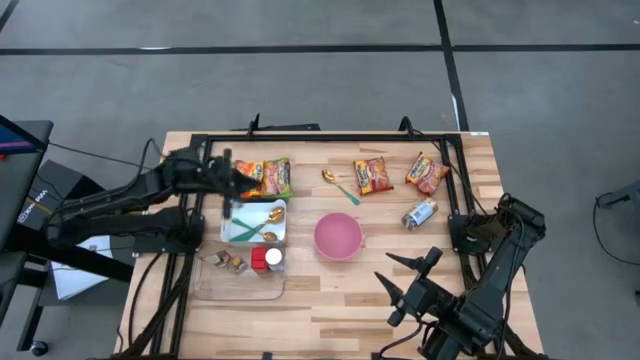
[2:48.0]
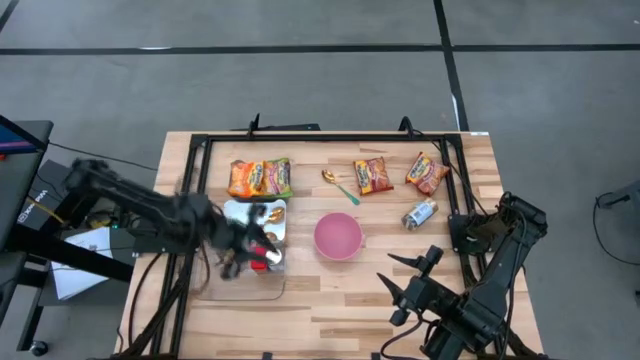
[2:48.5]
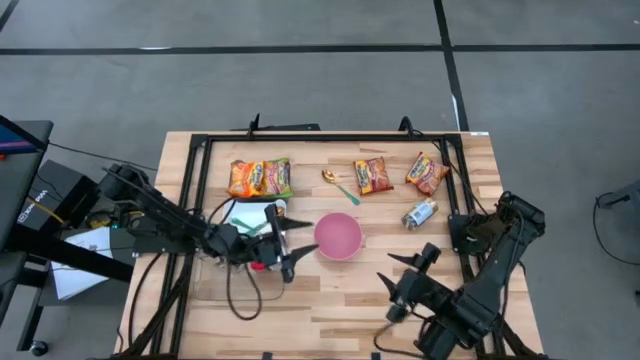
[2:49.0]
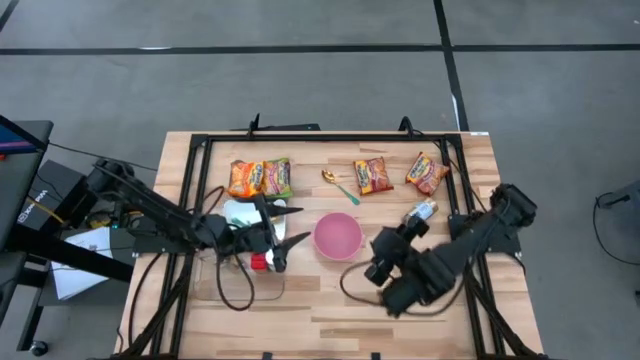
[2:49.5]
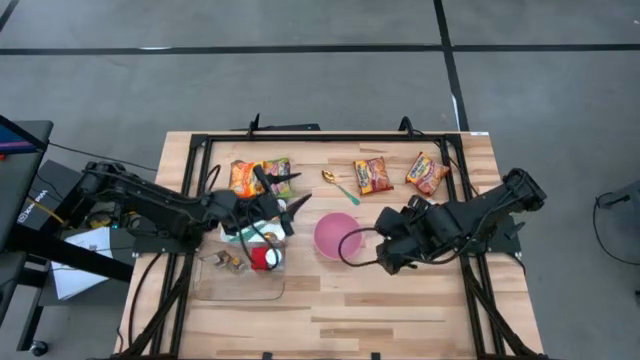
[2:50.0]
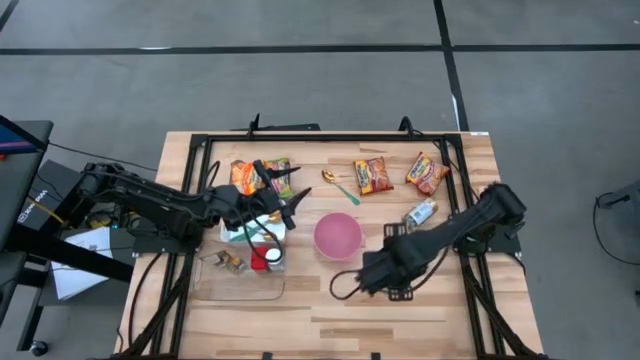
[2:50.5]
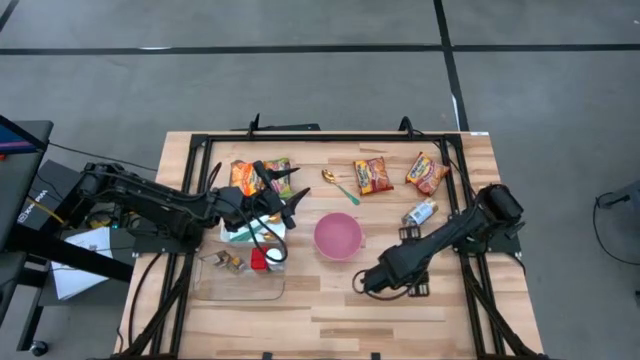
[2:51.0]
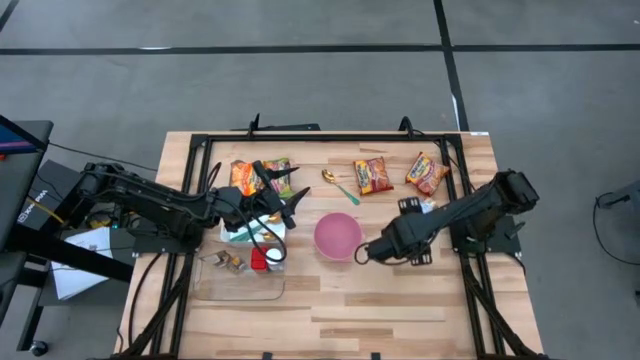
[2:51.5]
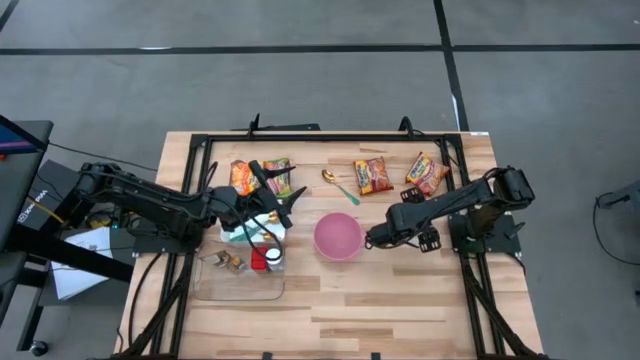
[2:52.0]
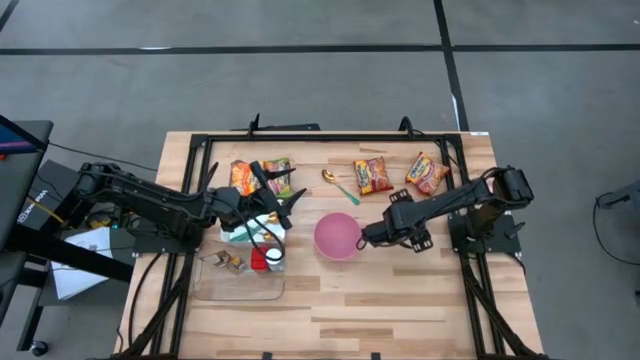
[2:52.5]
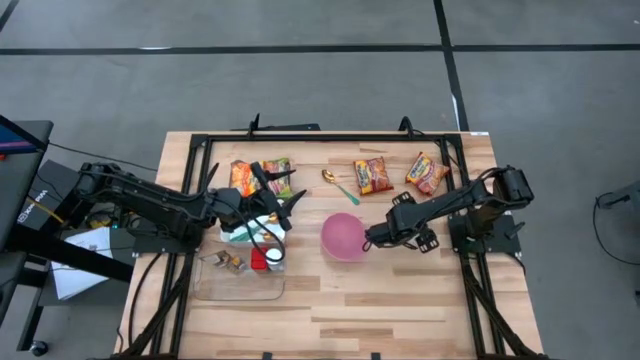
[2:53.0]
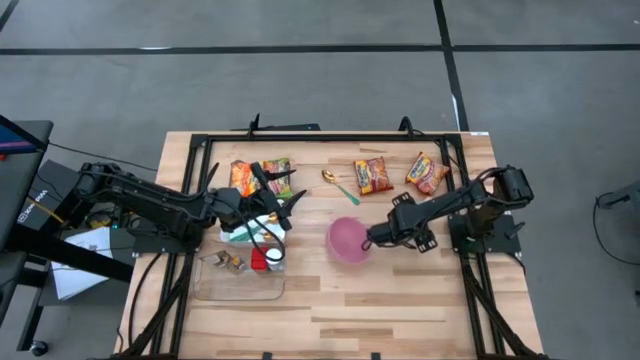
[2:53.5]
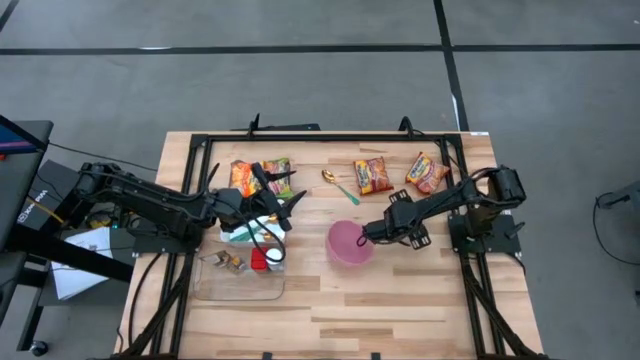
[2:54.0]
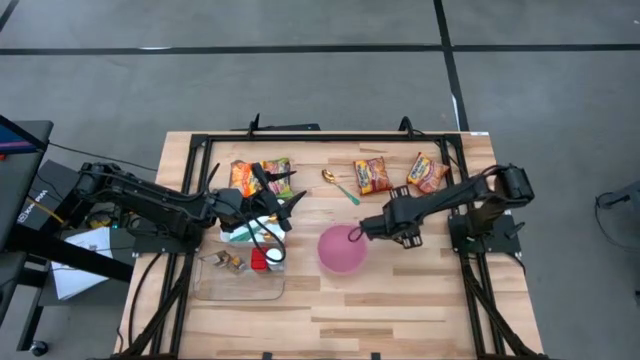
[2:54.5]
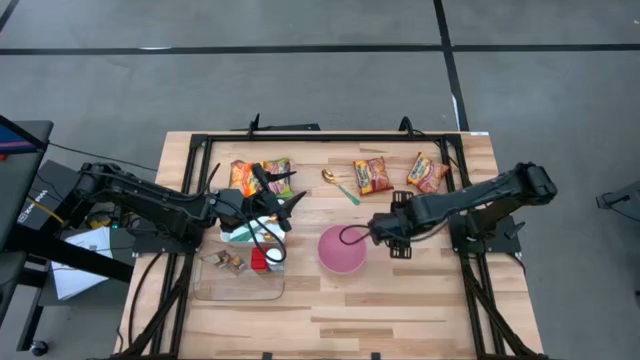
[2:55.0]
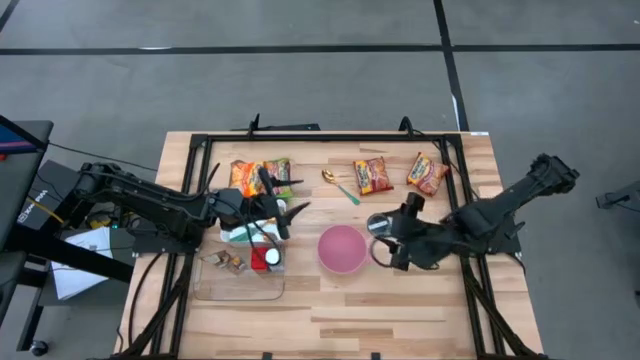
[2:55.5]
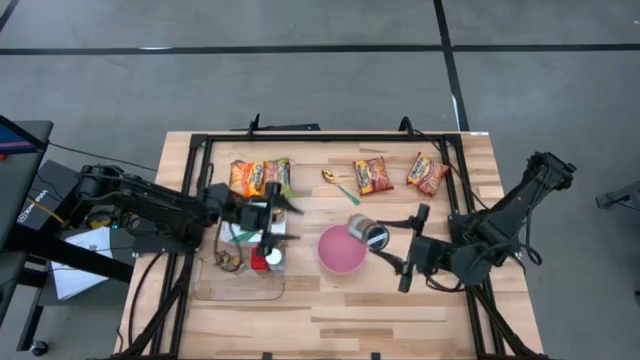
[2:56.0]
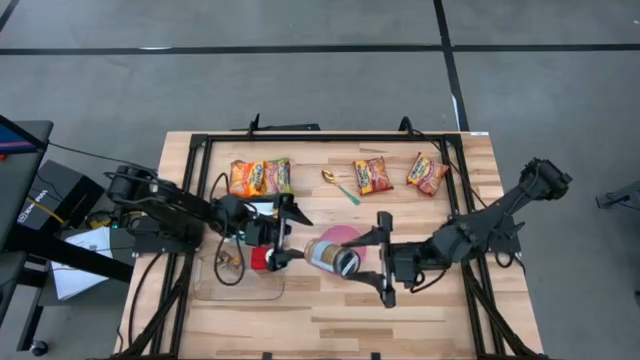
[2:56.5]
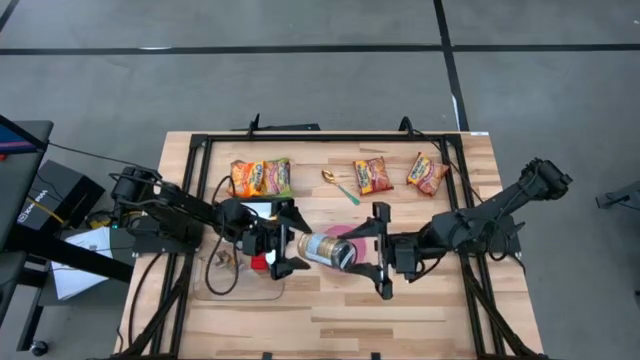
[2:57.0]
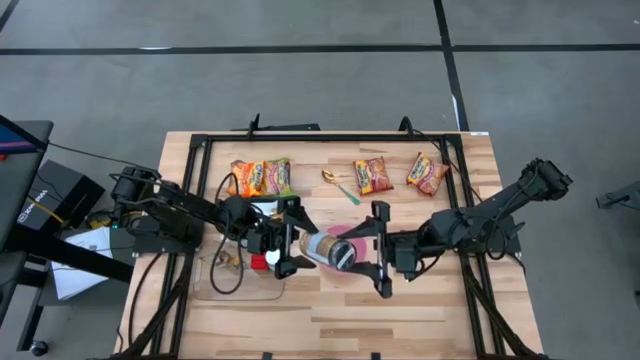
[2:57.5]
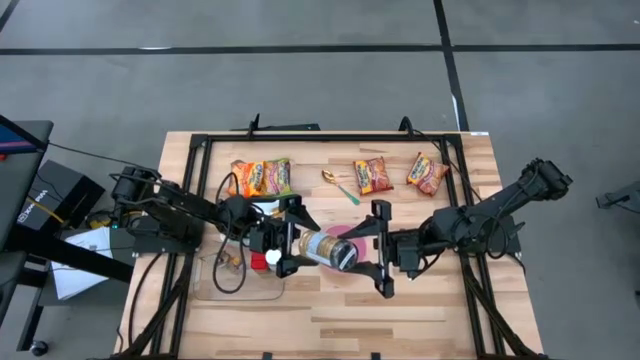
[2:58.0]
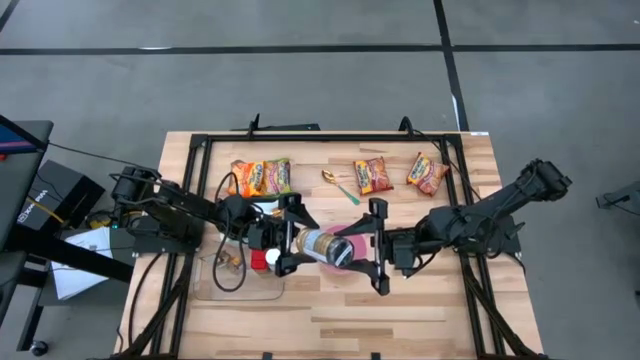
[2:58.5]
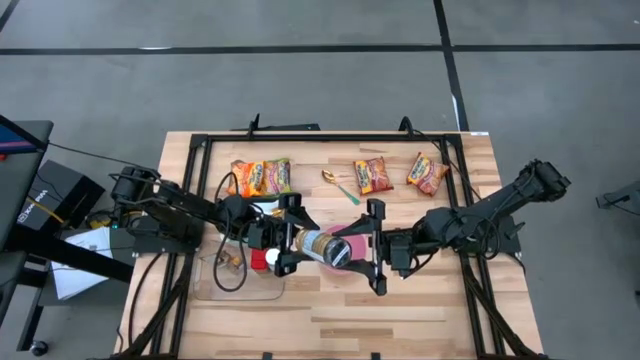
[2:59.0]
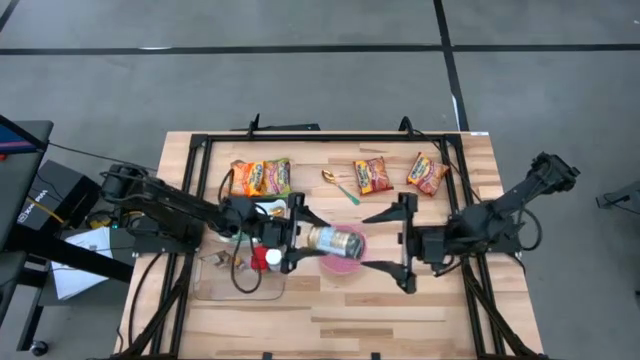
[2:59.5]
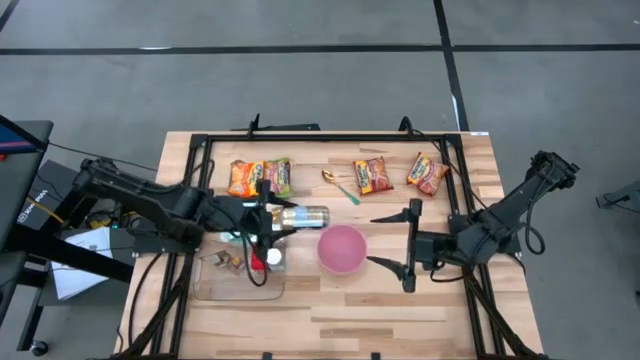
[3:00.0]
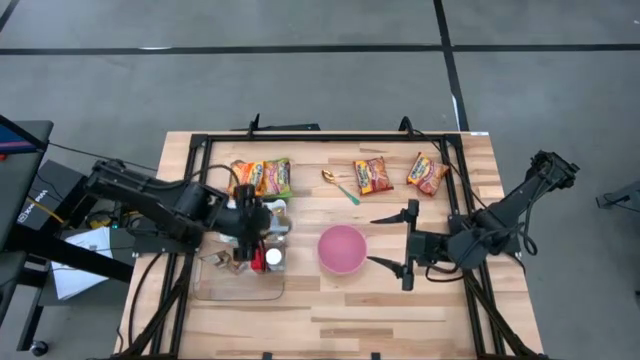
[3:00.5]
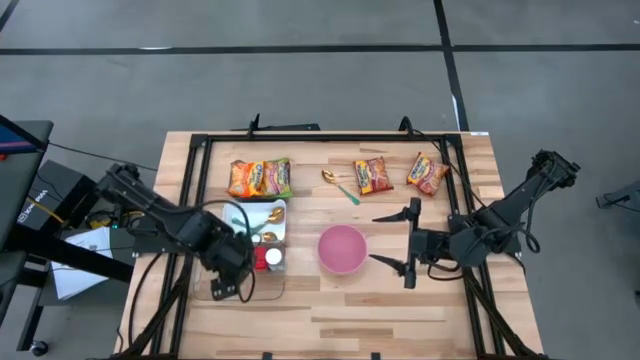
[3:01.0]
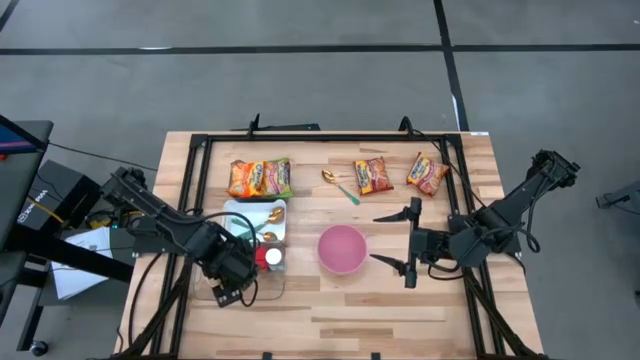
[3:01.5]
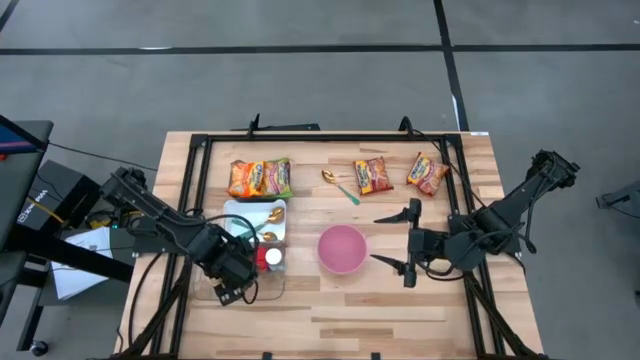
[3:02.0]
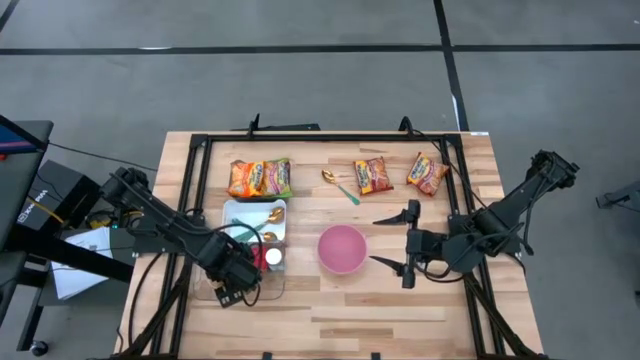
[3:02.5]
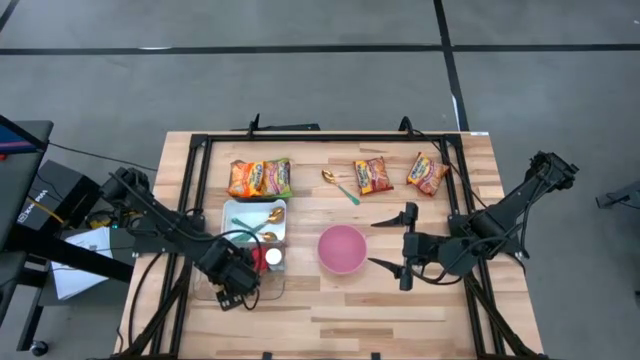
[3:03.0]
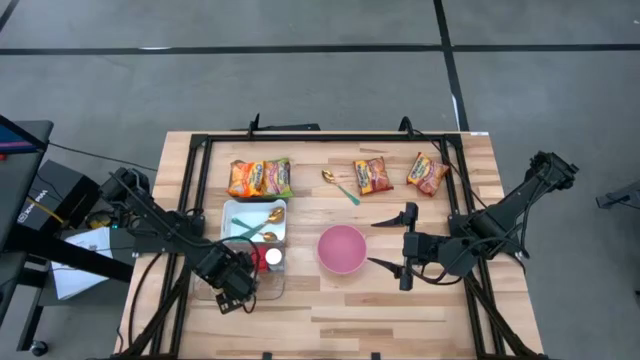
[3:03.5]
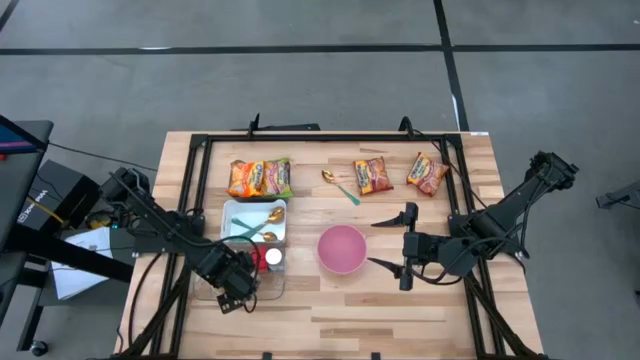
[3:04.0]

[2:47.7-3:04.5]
Task: Pick & Place Food Item
Put the gold spice bottle into the transparent bin

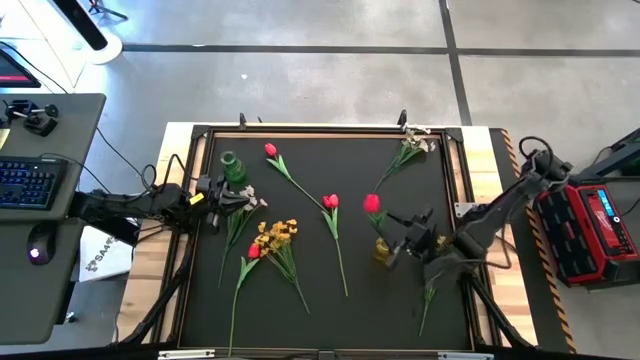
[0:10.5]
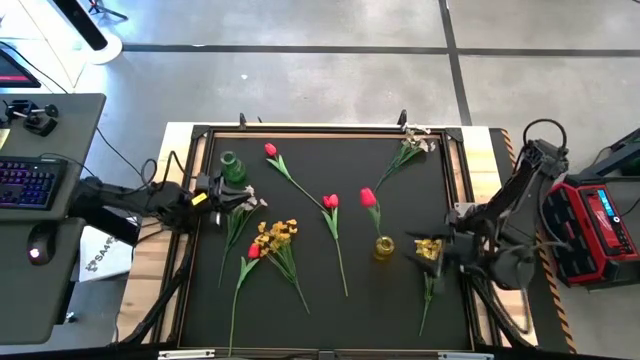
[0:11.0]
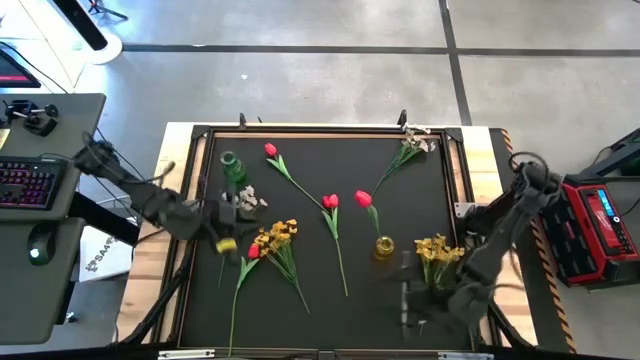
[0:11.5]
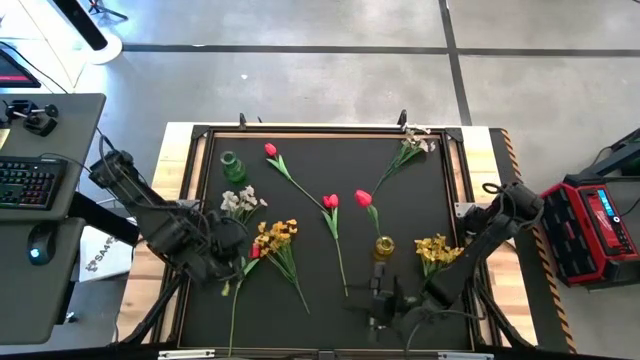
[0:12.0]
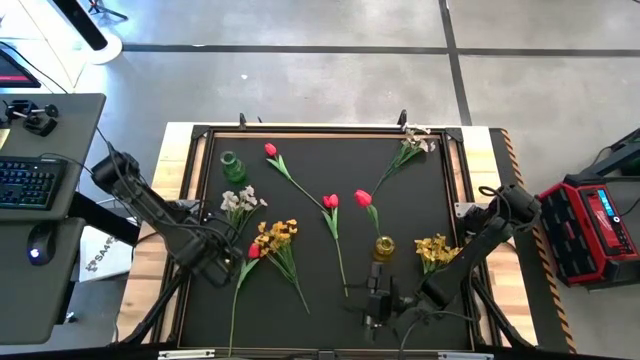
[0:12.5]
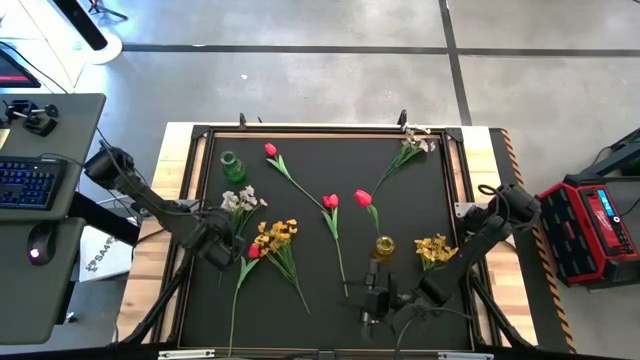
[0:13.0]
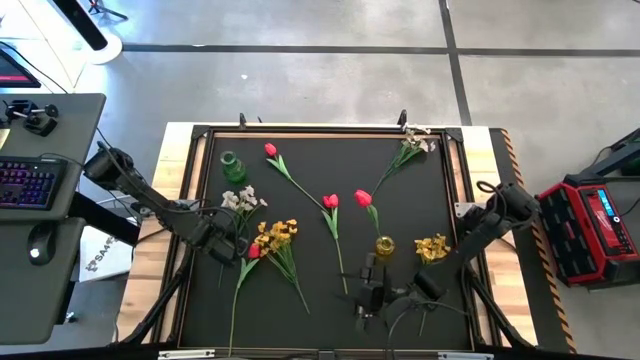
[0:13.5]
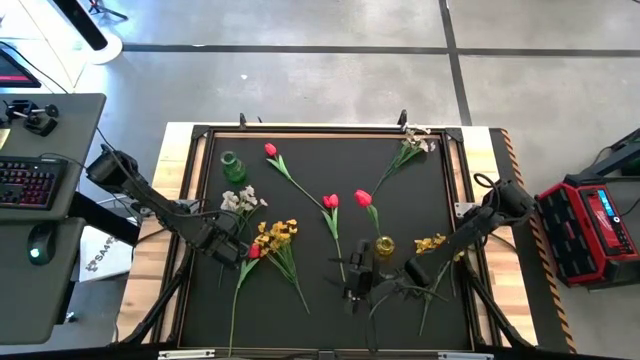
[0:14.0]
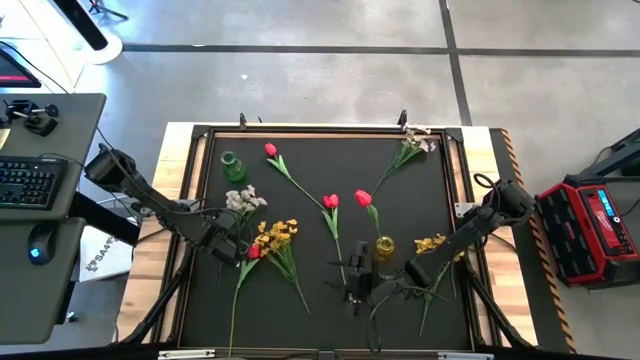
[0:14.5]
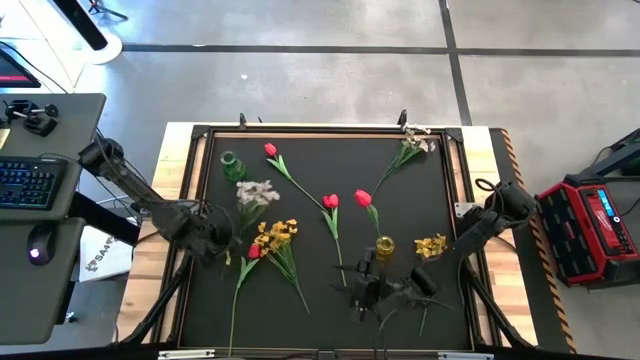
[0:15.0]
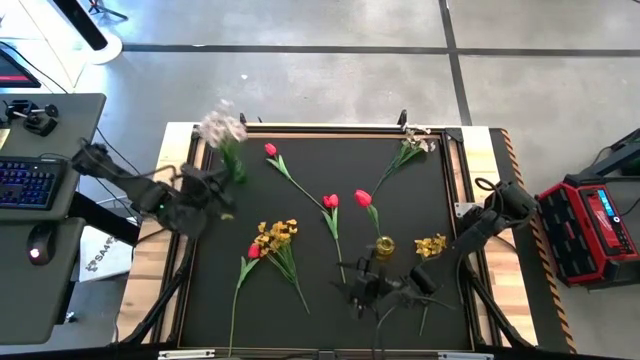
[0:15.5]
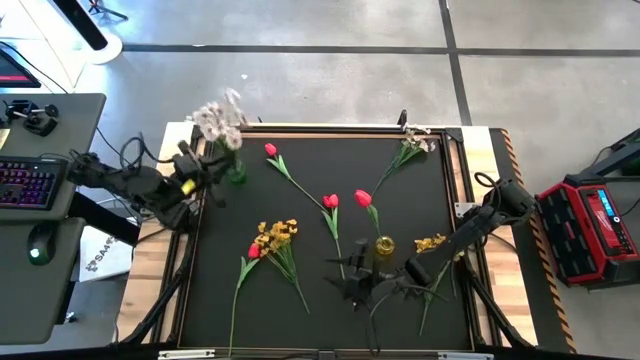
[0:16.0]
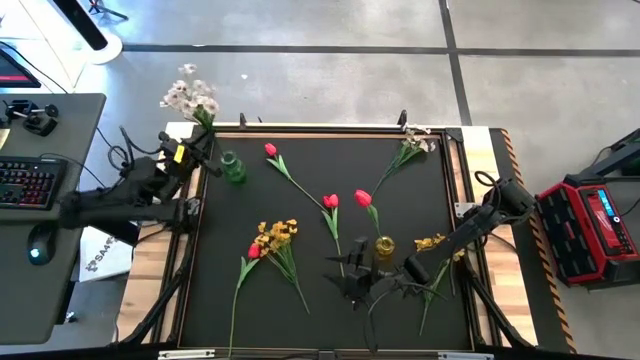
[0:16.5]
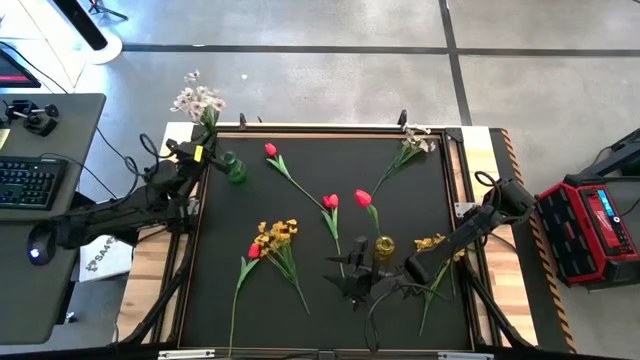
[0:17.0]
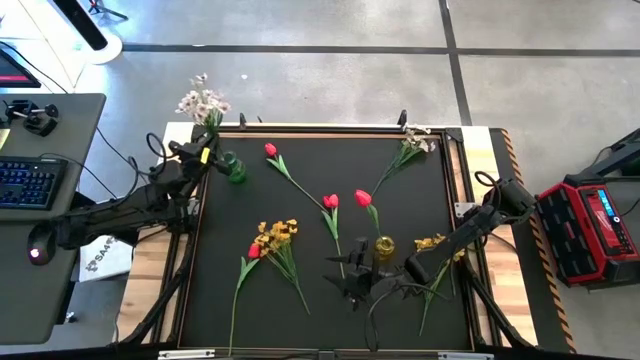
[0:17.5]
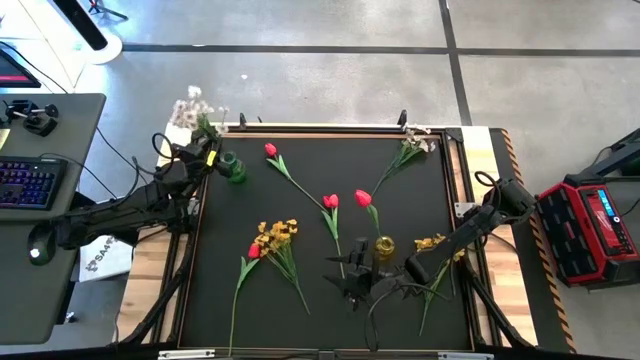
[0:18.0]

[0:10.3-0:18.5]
Task: Sort flowers into vase by color
Put the left white clustered flowers into the green flower vase
